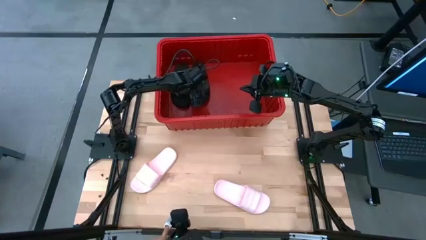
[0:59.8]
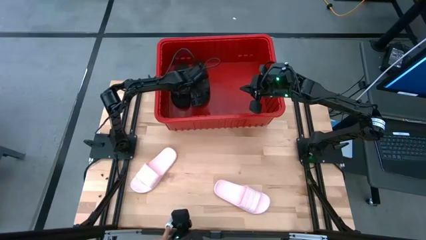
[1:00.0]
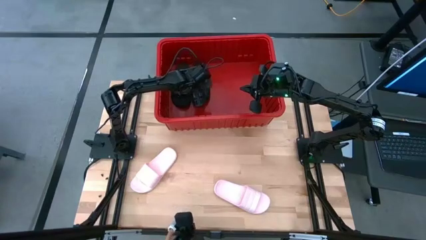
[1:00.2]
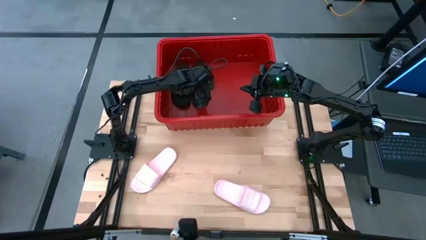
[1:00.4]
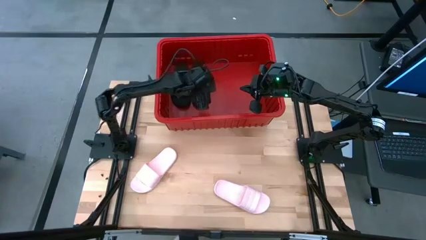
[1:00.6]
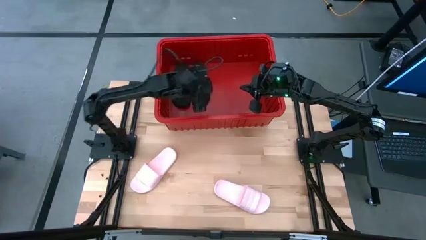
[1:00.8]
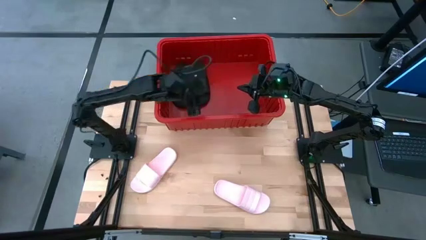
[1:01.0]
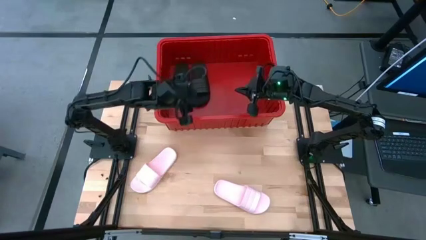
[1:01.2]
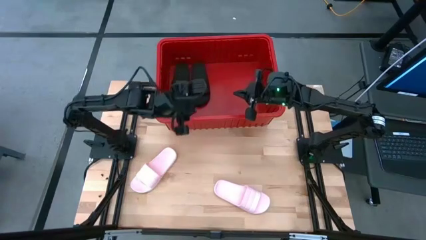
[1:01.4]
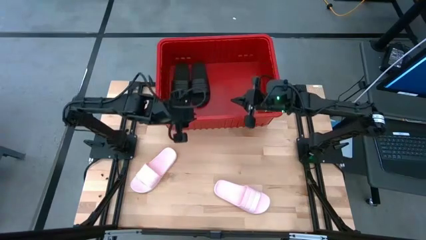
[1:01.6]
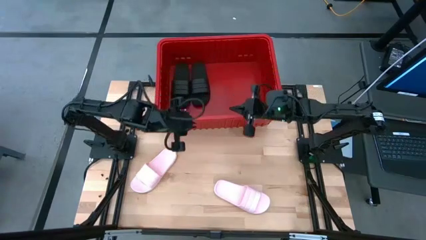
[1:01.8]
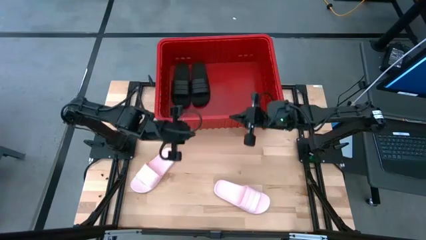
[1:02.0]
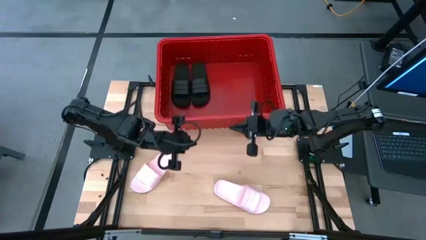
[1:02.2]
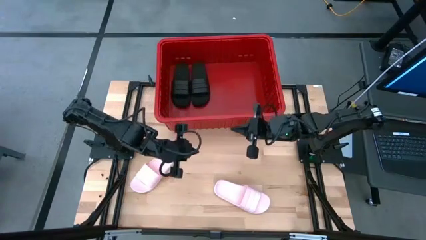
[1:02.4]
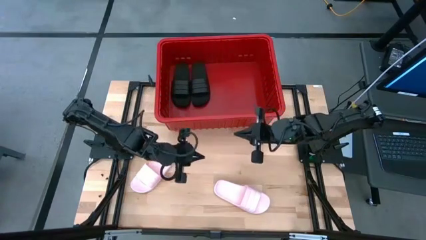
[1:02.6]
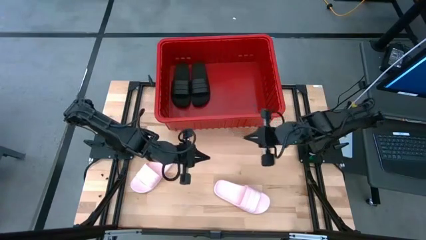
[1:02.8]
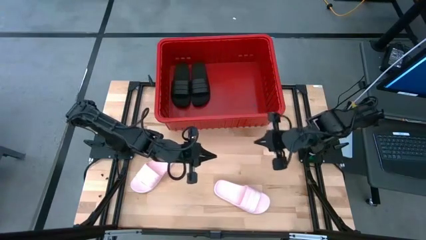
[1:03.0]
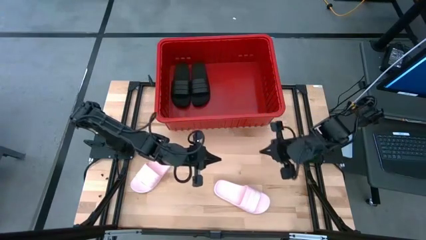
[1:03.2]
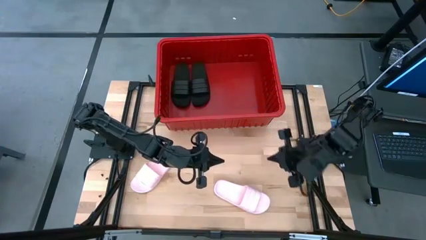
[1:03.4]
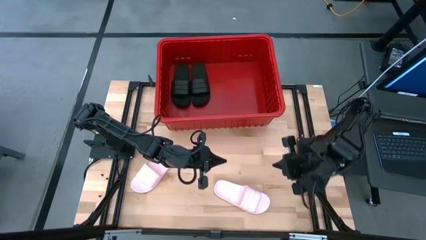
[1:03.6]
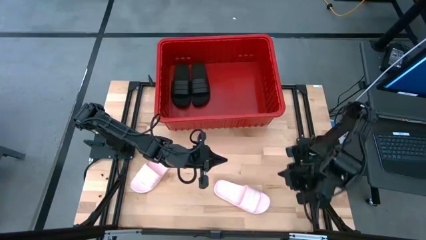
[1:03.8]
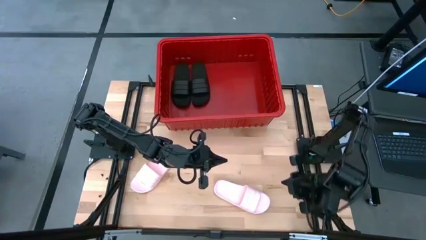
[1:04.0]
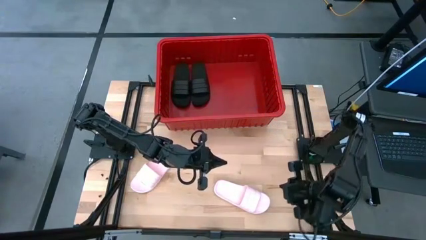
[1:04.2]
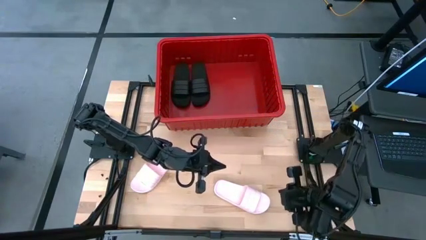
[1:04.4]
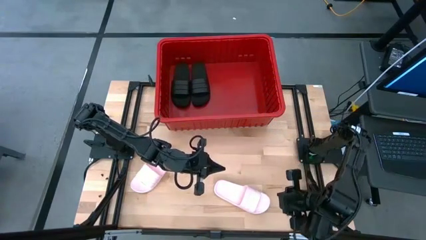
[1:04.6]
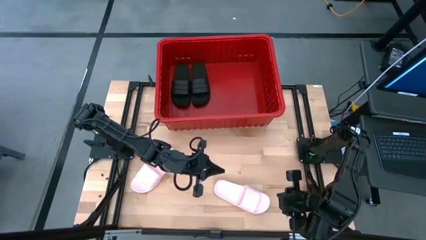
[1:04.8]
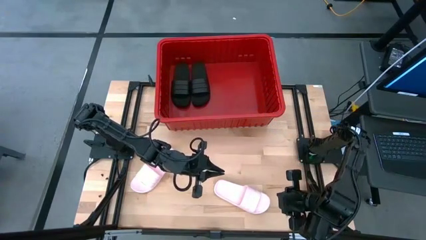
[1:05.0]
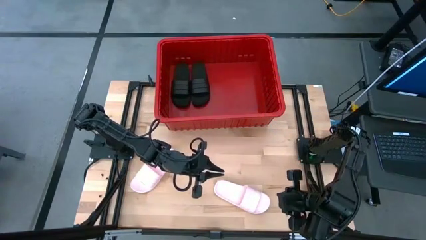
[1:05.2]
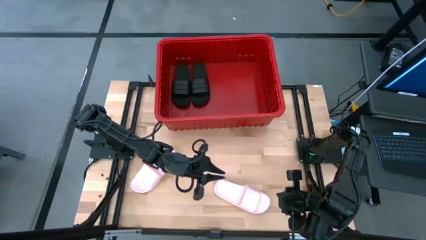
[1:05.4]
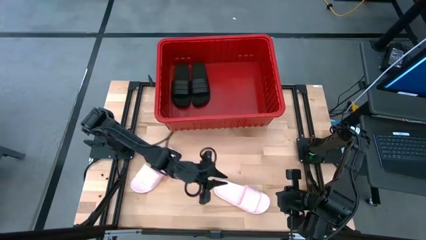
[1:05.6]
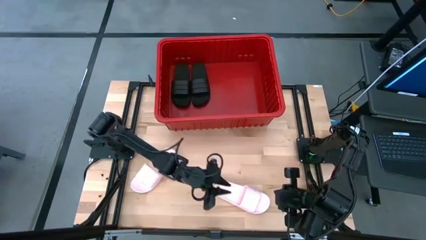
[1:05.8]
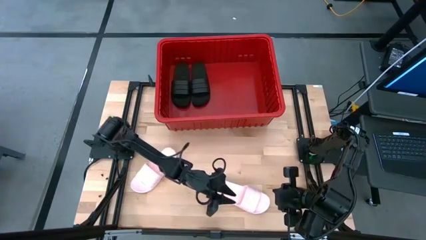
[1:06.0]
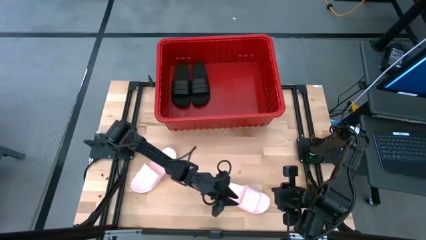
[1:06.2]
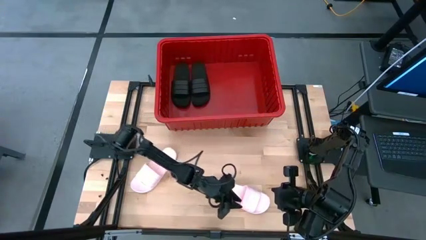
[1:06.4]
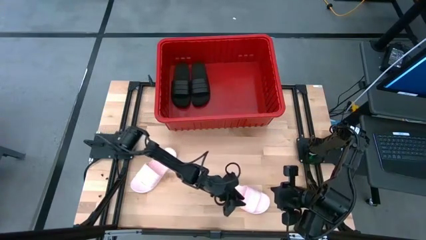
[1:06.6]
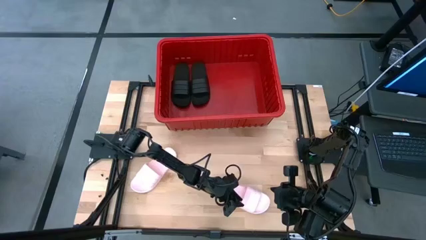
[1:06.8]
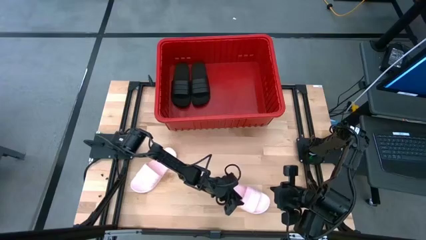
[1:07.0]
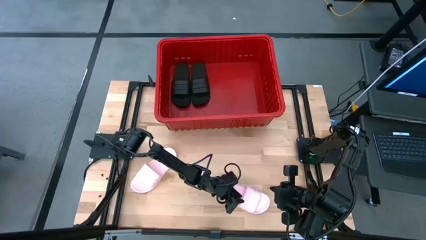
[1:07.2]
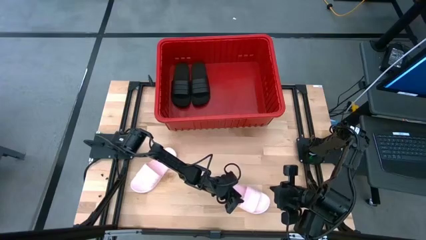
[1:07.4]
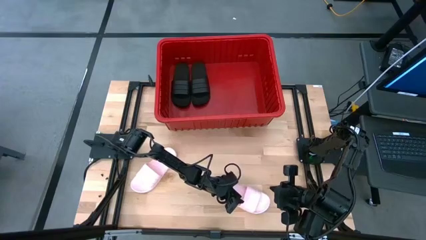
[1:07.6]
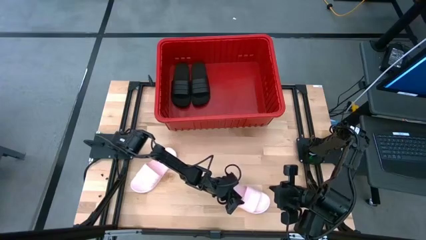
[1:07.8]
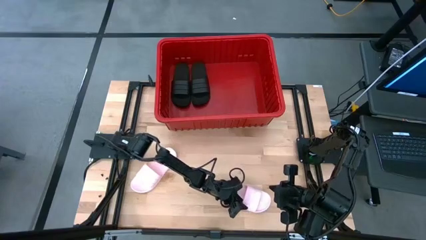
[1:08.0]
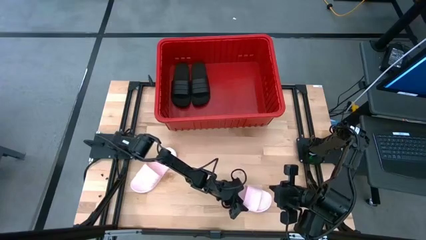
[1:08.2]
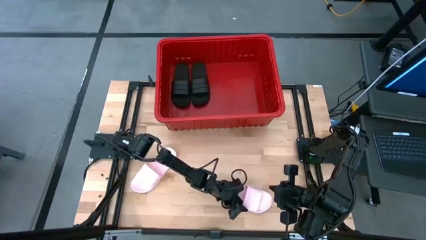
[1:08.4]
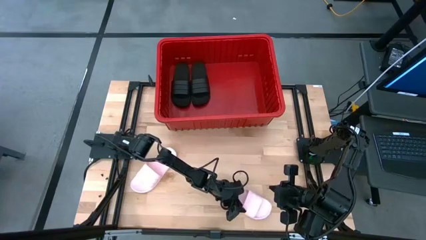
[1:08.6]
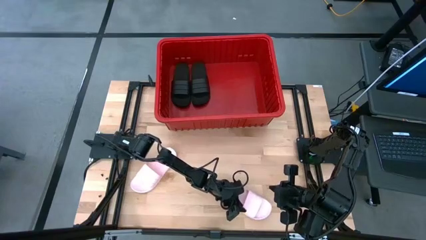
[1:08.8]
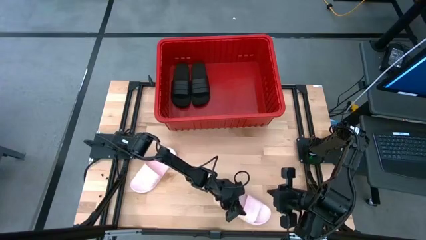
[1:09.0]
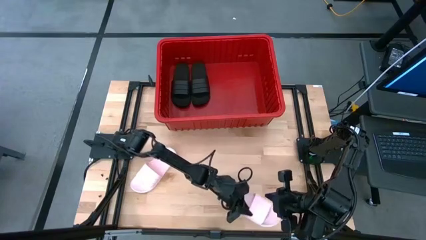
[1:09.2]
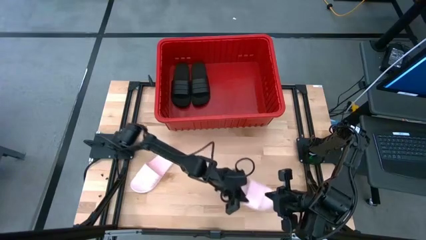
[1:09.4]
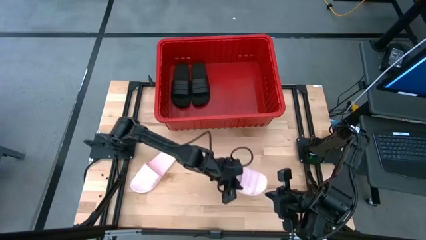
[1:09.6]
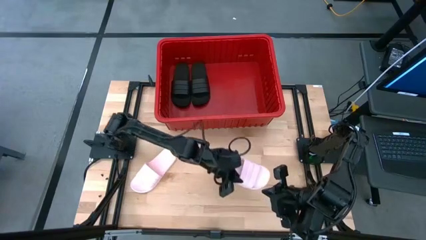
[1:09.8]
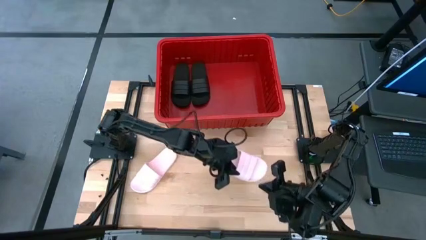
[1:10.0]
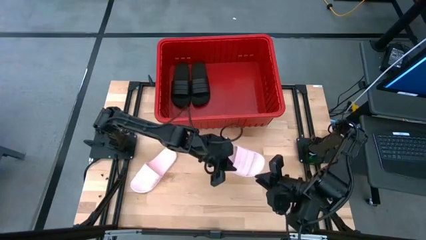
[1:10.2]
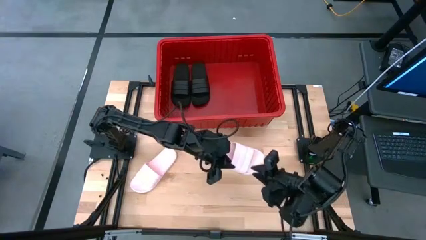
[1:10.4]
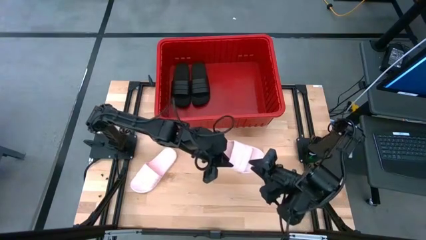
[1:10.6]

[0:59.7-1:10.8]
Task: Pick and place slides into bin
Put the right pink slides into the red bin

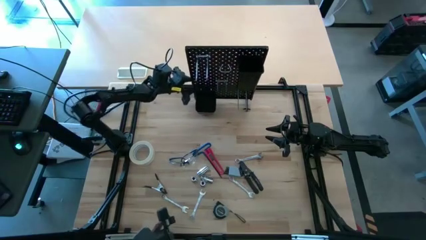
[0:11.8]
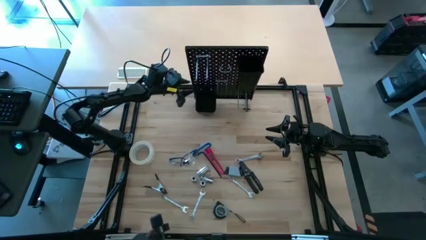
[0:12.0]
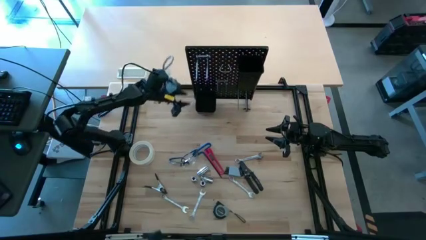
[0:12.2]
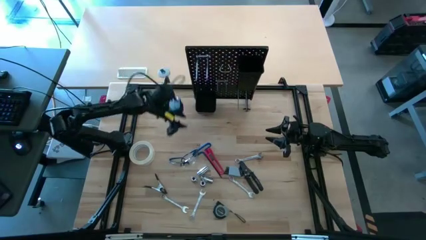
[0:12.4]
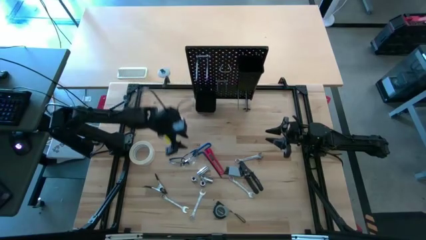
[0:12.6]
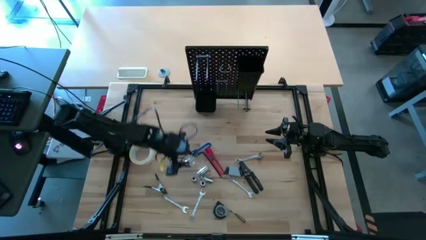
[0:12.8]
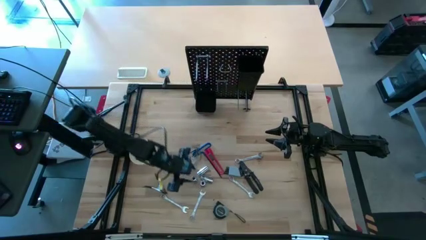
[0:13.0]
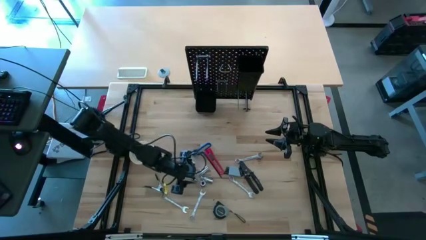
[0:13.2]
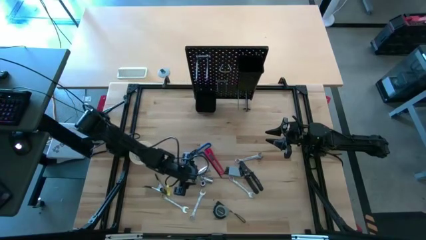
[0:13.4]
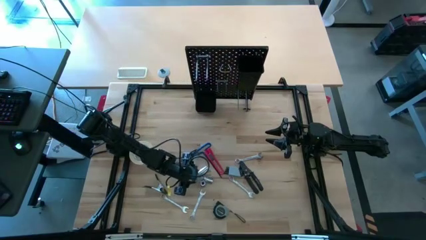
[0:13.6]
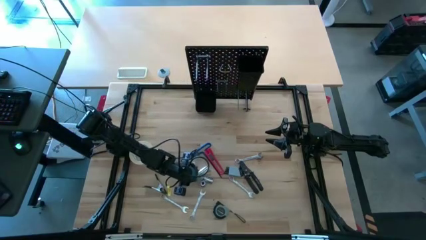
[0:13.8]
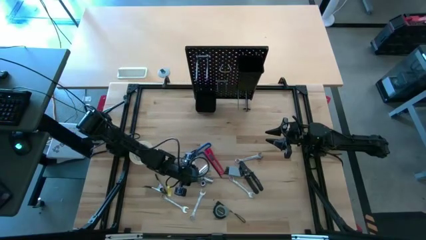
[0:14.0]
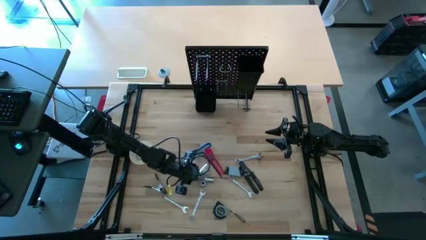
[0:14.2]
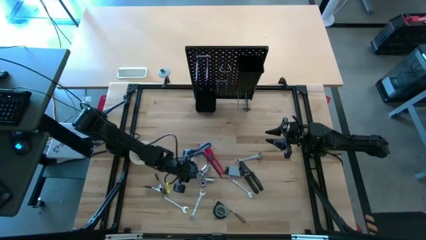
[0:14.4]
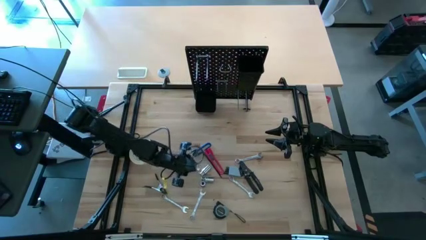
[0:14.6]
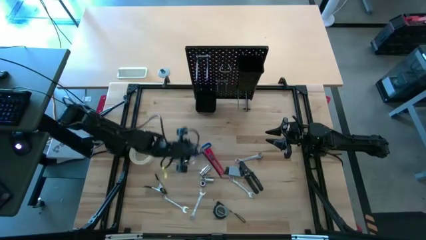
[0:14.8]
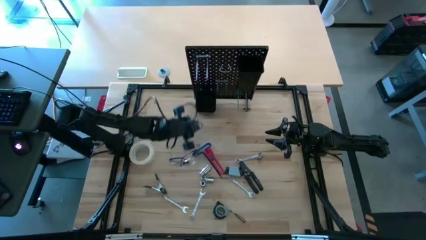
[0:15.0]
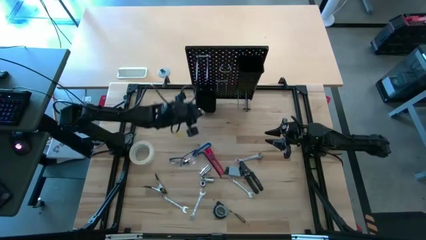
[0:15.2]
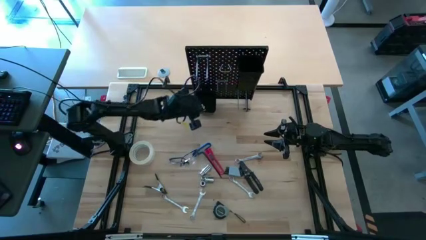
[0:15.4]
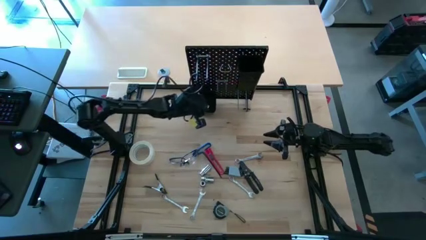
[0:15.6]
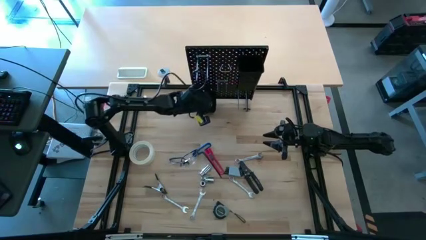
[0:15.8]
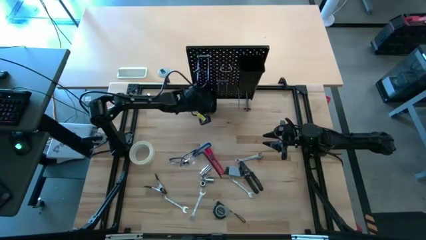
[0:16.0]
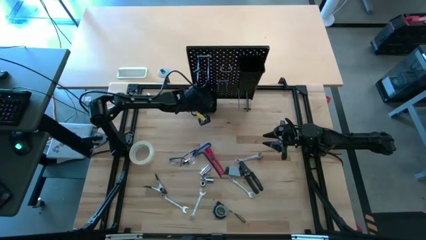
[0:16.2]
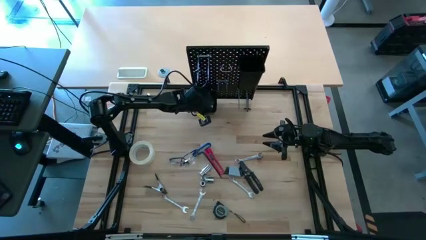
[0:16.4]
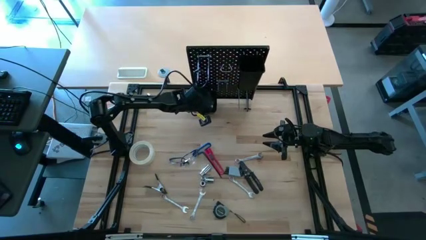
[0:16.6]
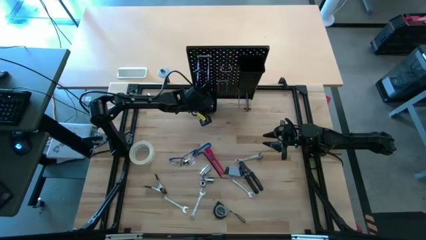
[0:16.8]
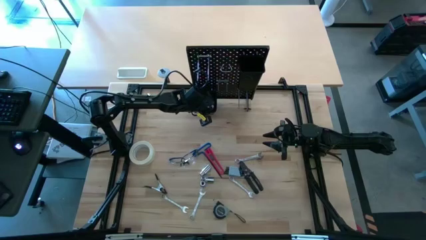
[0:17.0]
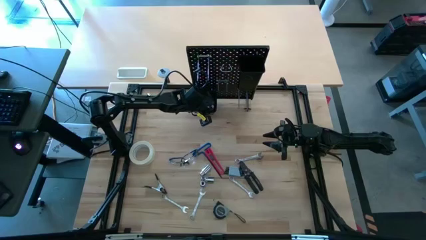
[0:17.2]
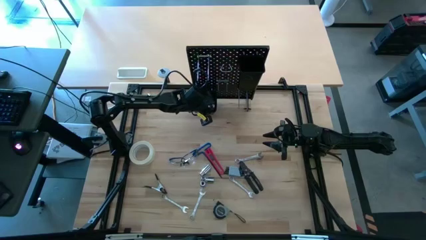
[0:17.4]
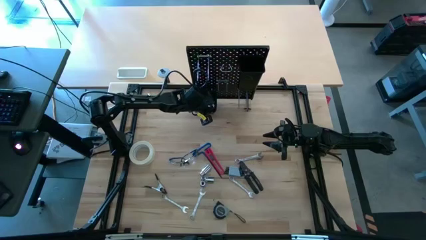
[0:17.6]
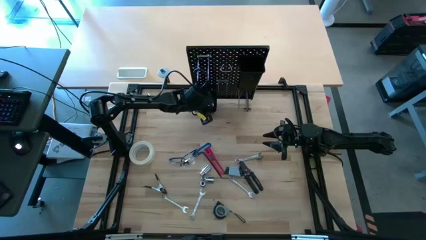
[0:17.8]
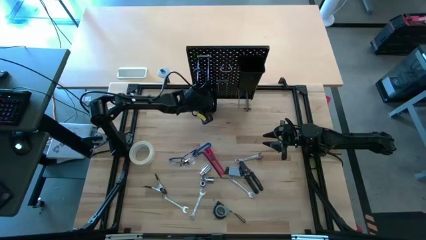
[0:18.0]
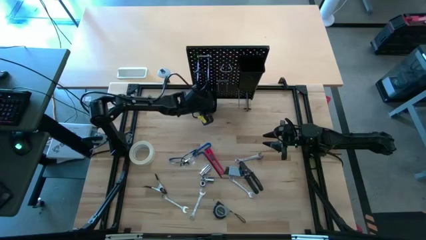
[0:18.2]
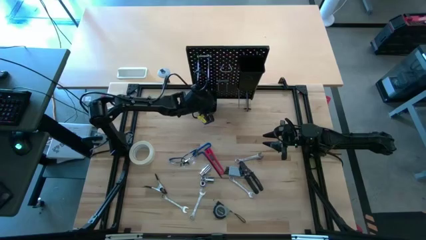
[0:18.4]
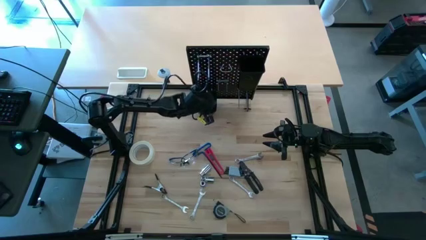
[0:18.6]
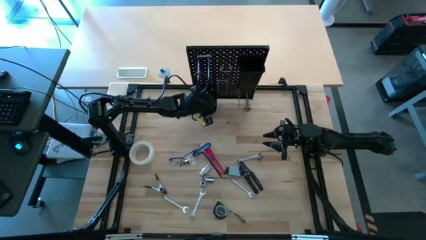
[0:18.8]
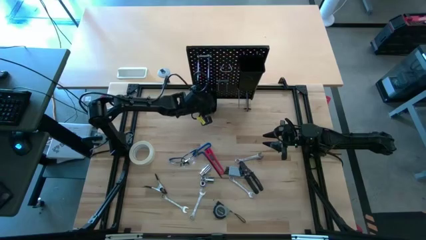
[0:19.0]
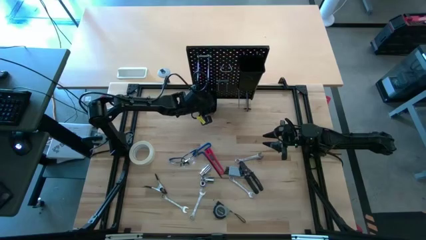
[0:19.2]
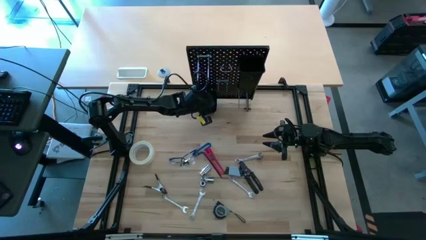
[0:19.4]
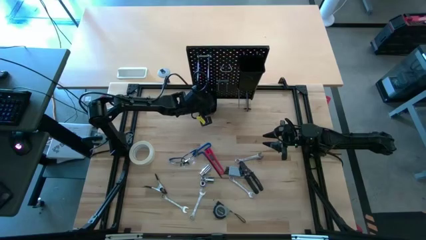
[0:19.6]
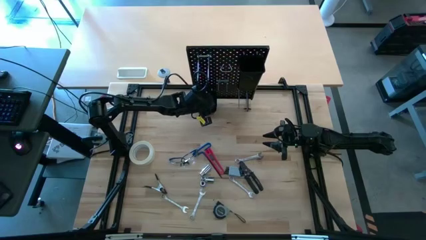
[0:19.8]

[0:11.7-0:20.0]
Task: Hang tools onto peg board
Put the middle left socket into the bottom black bin on the peg board
